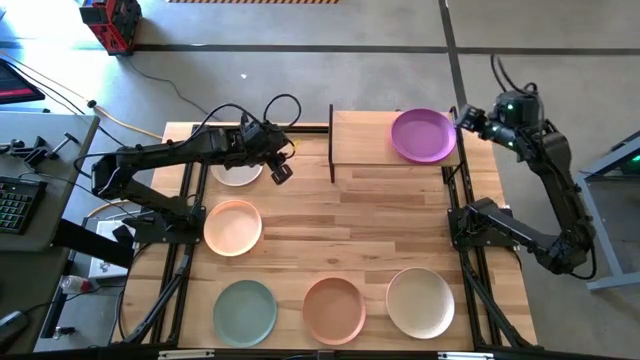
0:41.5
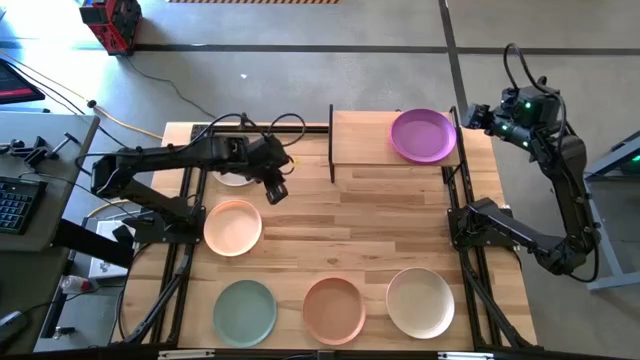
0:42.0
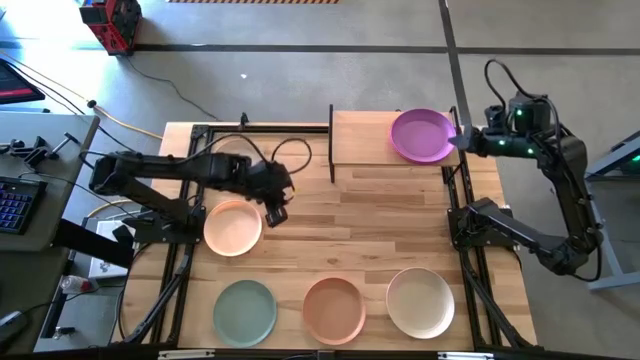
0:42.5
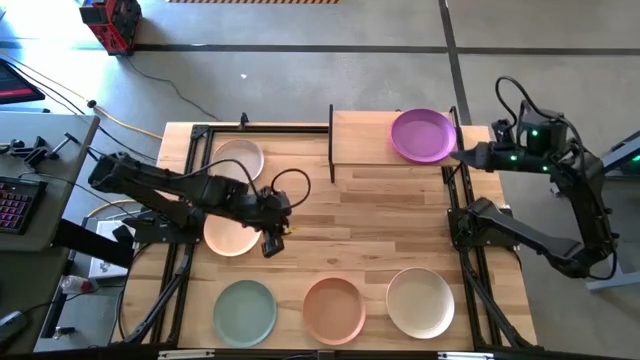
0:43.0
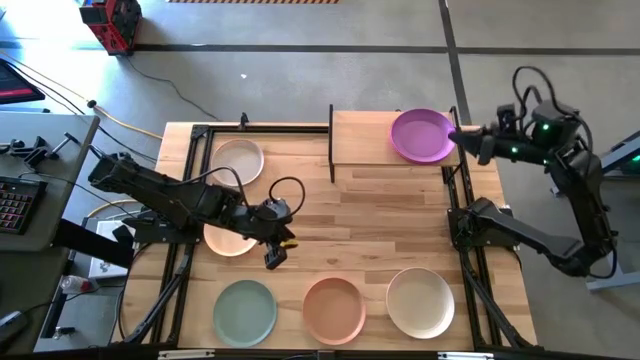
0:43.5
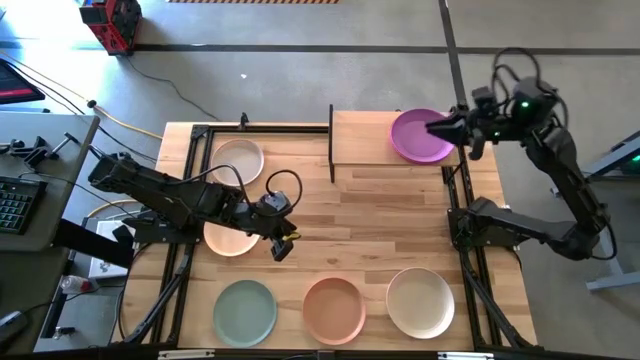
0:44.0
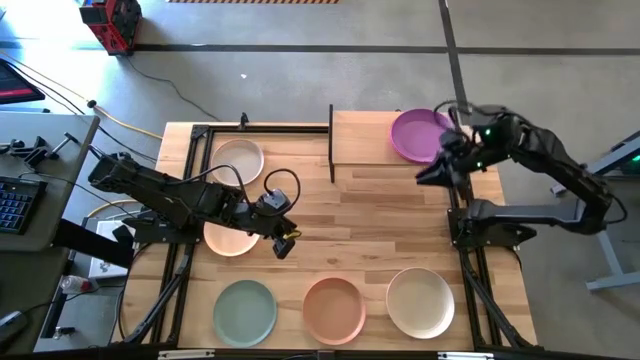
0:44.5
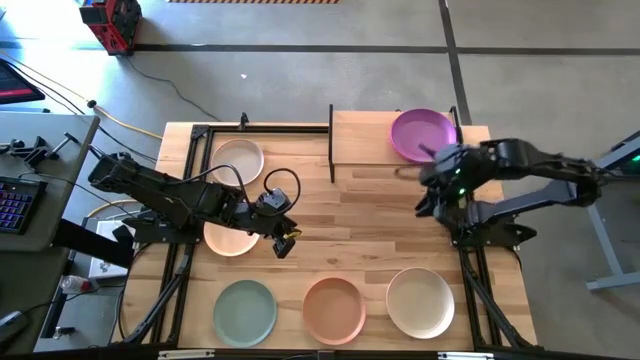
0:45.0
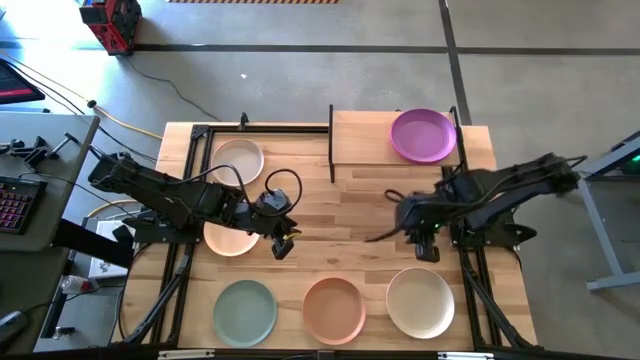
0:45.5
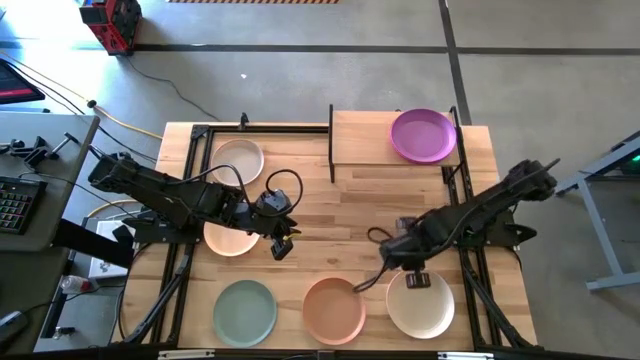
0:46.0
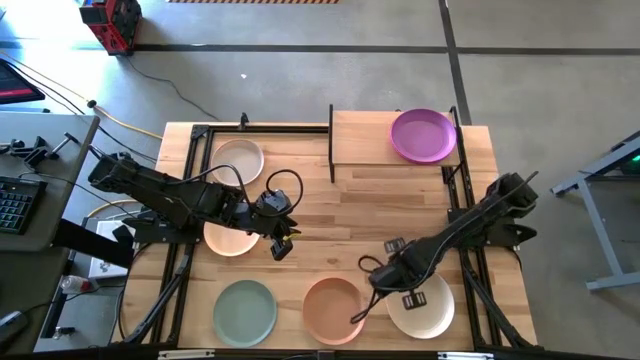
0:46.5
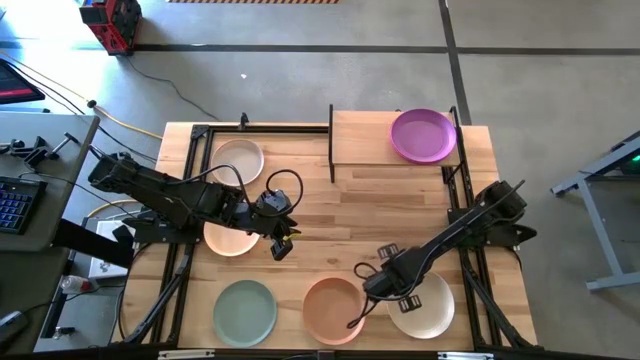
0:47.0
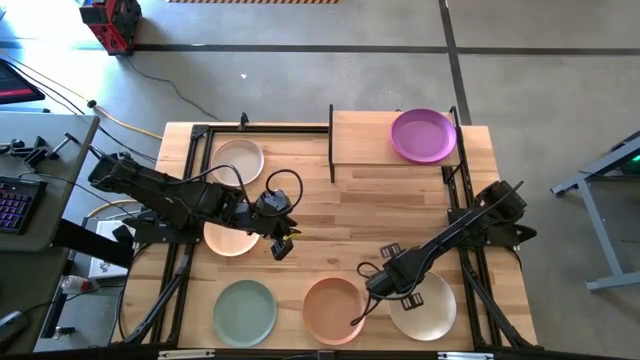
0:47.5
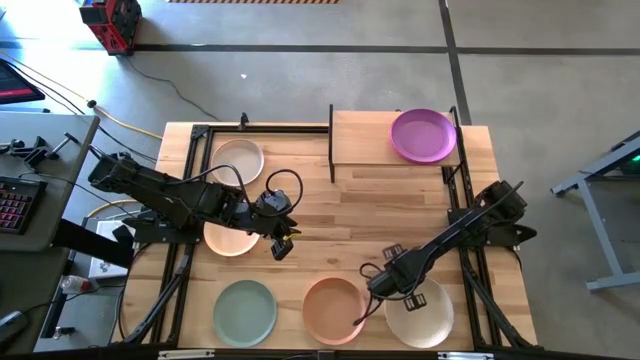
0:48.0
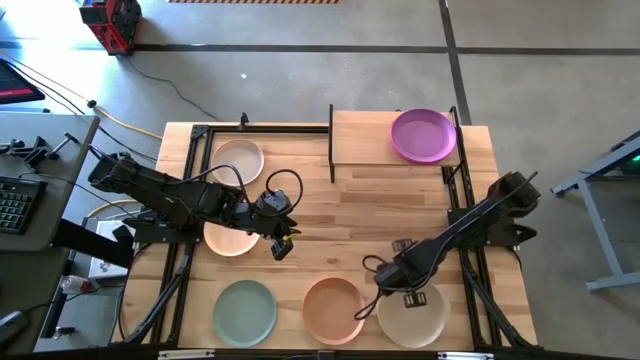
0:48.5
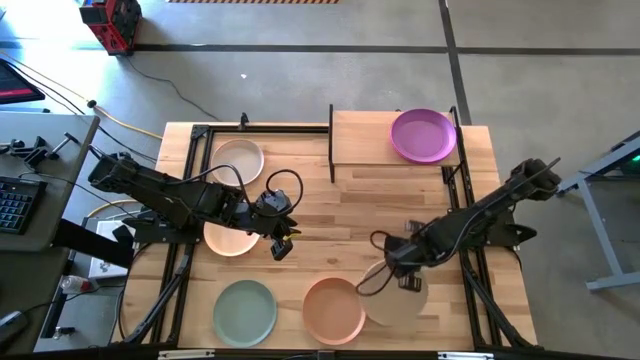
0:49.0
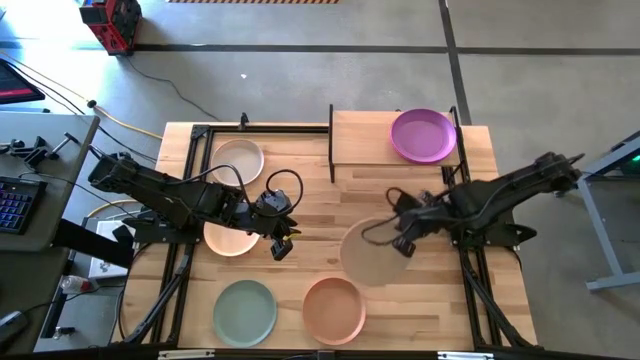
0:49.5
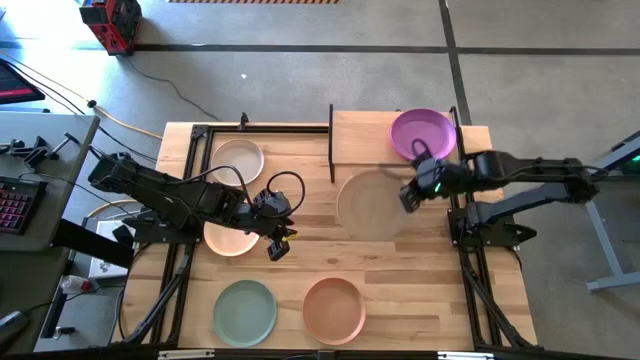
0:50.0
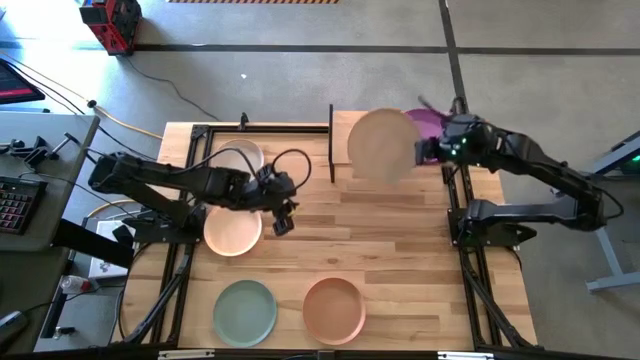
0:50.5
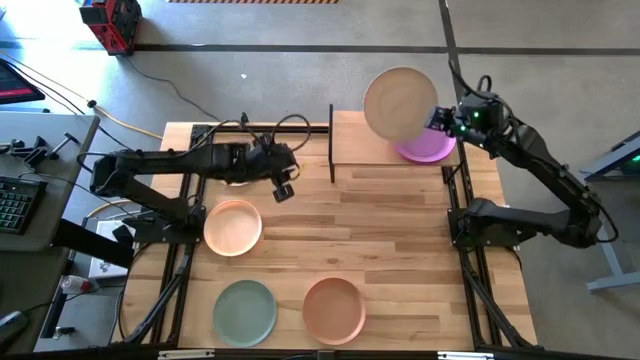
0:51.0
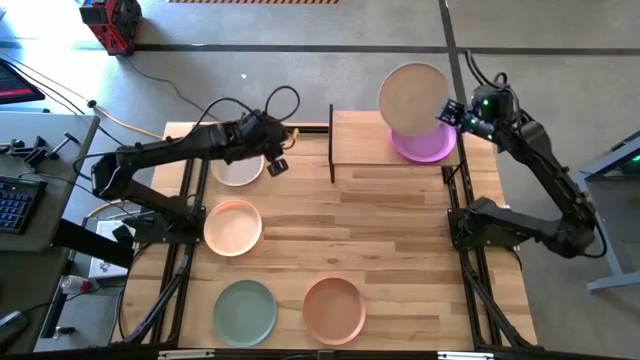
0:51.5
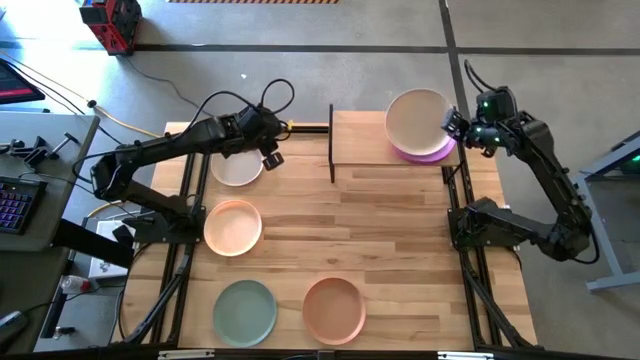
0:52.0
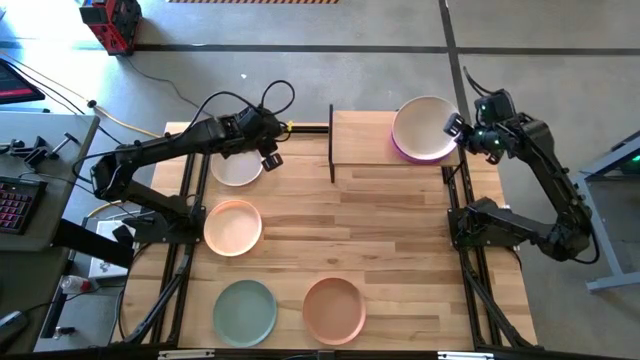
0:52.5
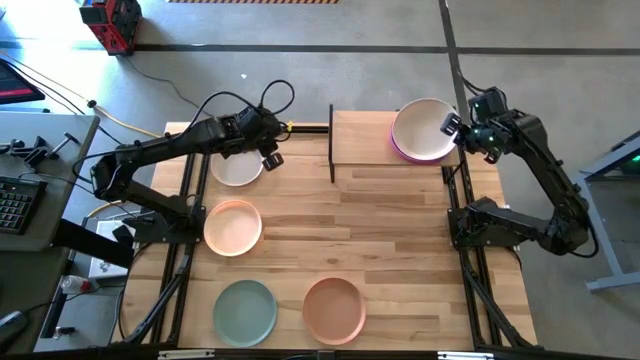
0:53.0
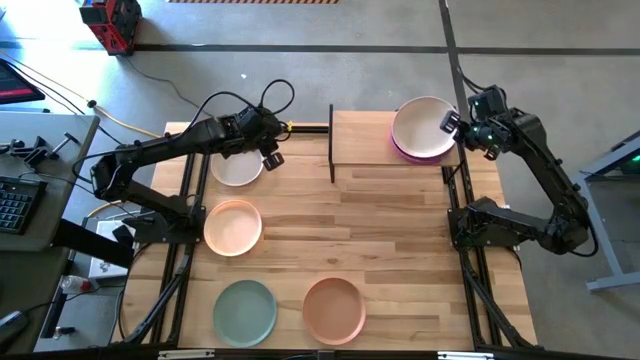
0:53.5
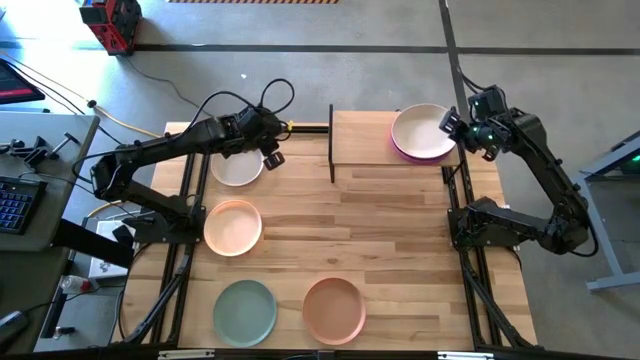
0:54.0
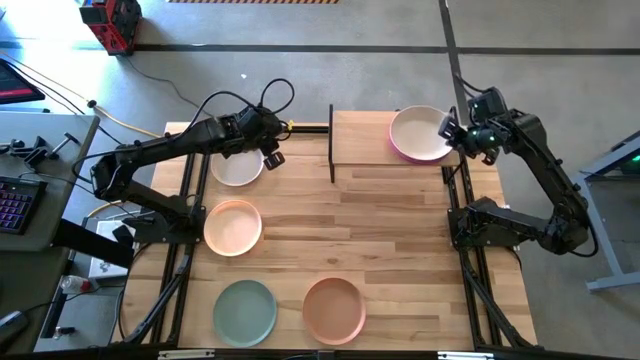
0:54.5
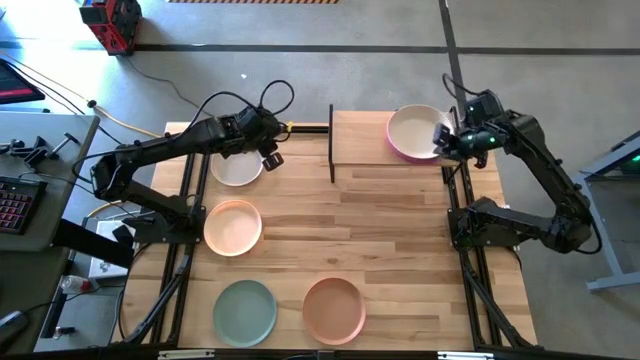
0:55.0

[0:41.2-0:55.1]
Task: Place and stack plates onto a shelf
Stack the bottom white plate on top of the purple plate on the shelf

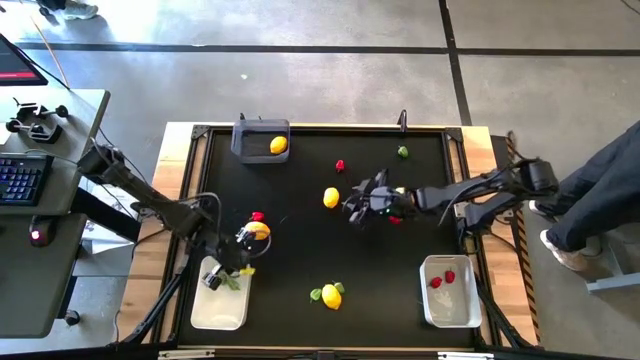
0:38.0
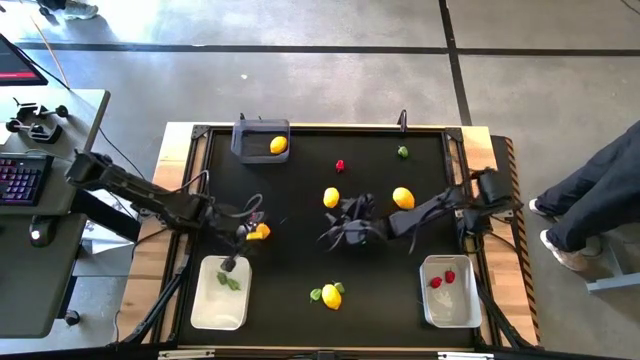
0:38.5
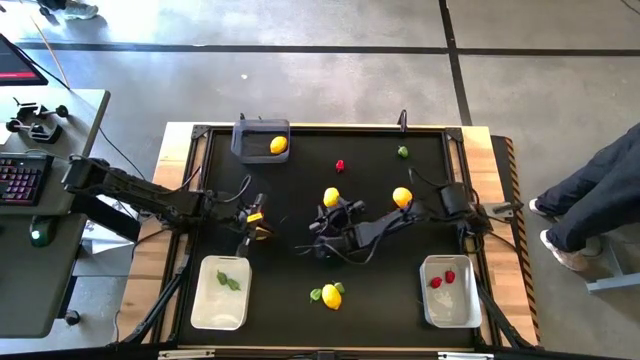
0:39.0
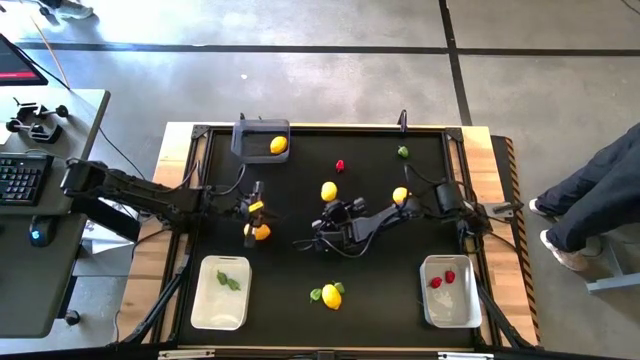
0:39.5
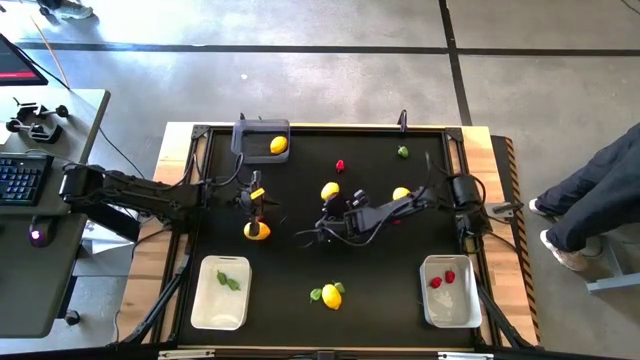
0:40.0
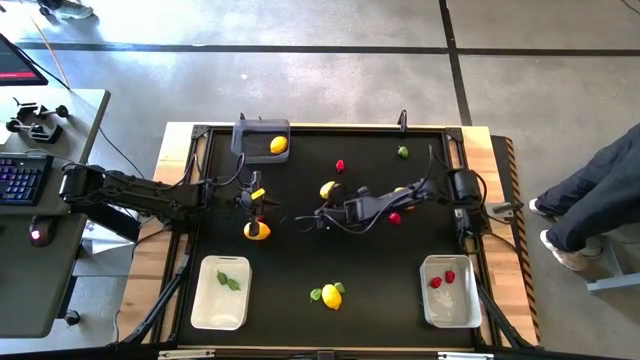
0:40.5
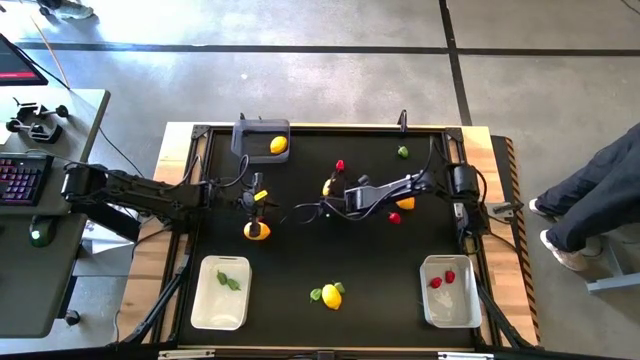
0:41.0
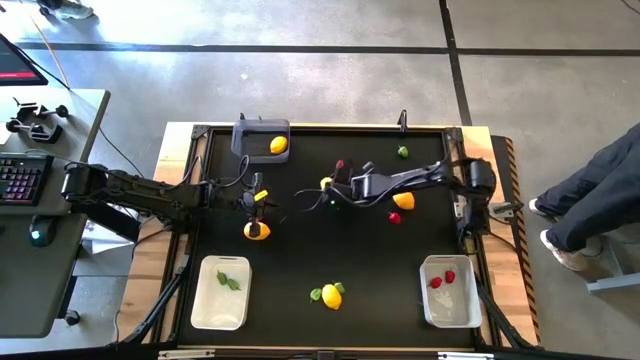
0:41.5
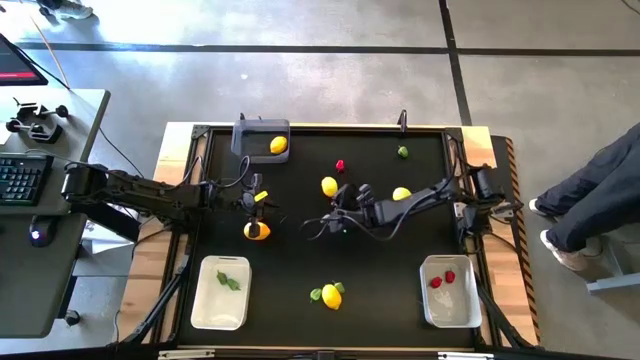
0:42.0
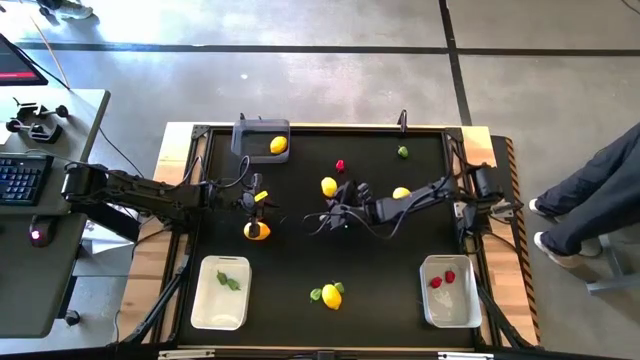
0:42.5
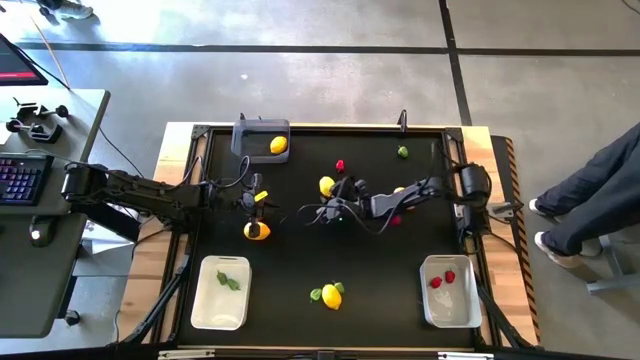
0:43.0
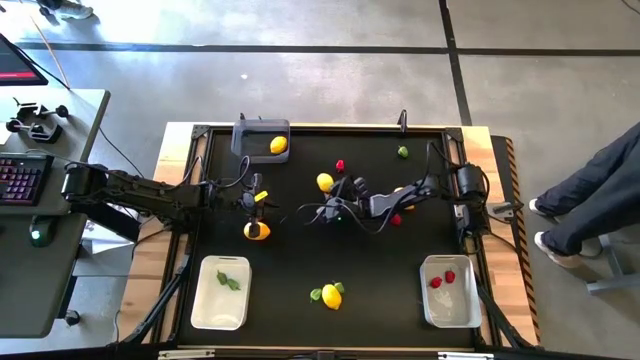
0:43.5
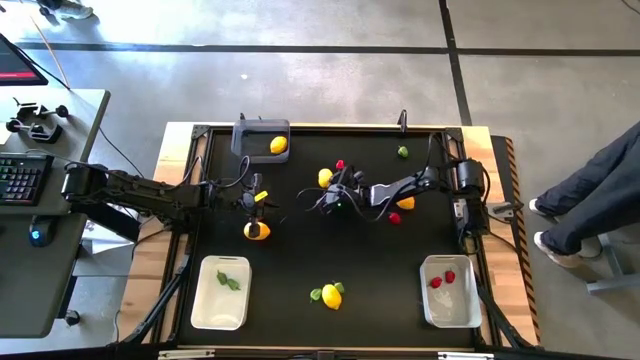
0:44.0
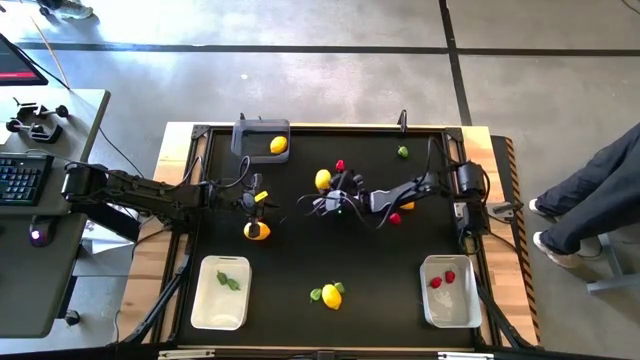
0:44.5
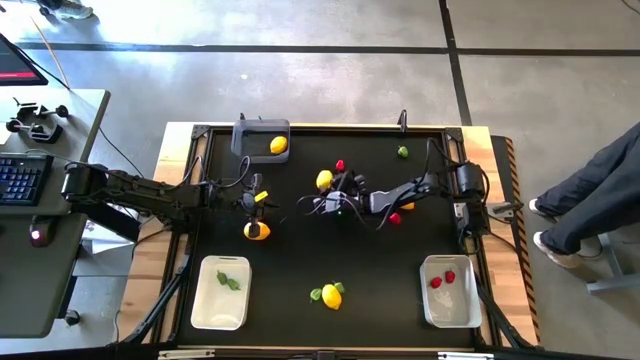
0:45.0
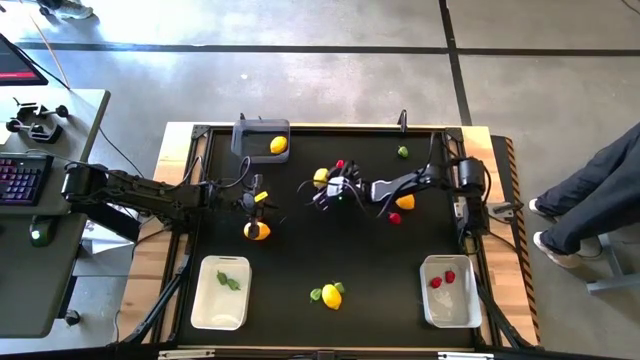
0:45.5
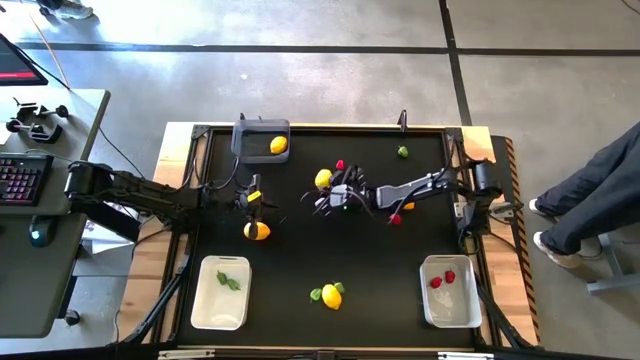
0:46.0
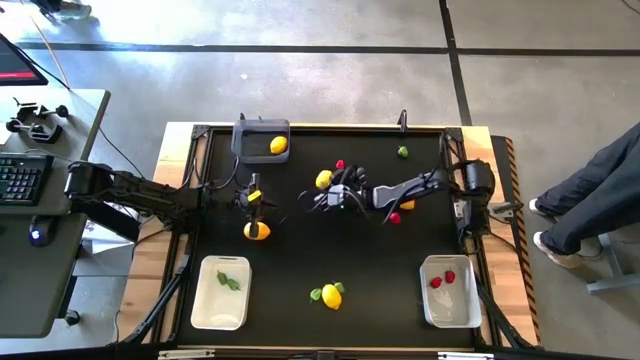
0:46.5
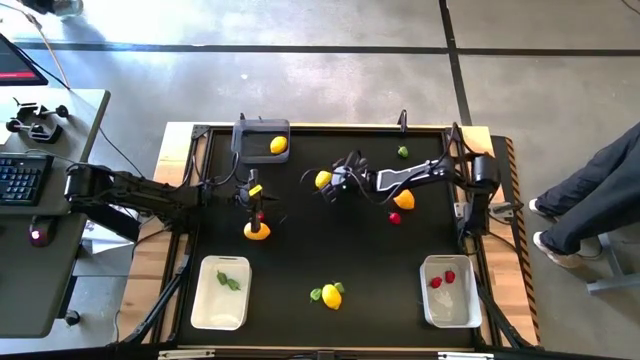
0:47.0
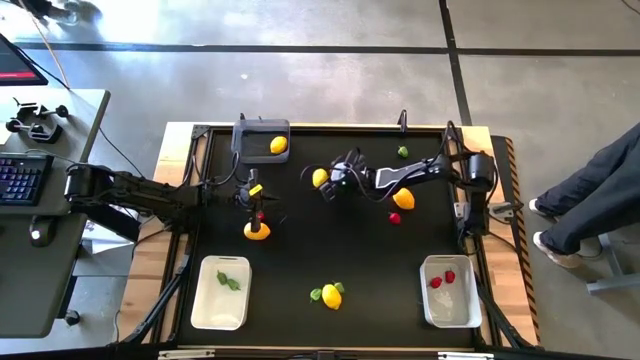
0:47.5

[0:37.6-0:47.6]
Task: Sort produce into baskets
Put the yellow lemon into the black bin
